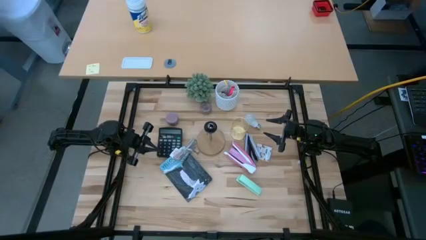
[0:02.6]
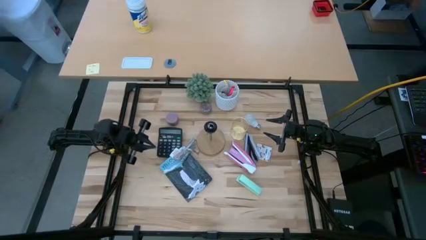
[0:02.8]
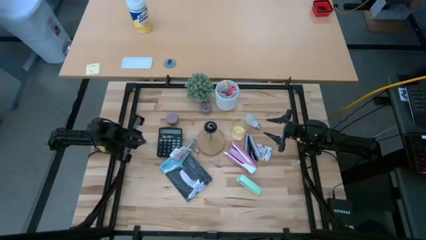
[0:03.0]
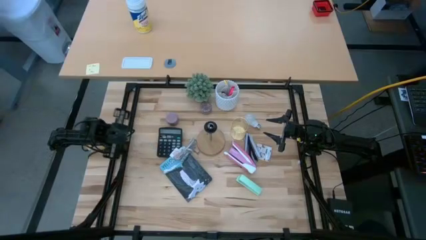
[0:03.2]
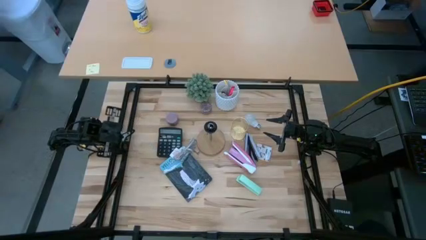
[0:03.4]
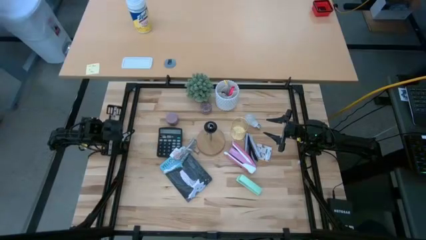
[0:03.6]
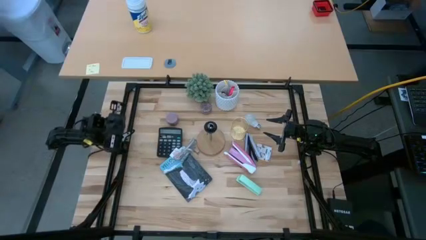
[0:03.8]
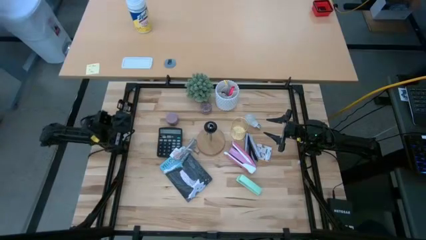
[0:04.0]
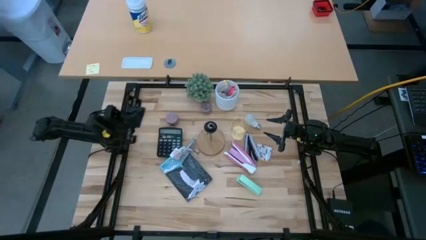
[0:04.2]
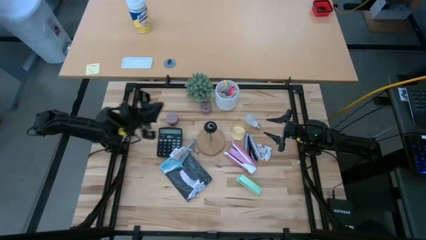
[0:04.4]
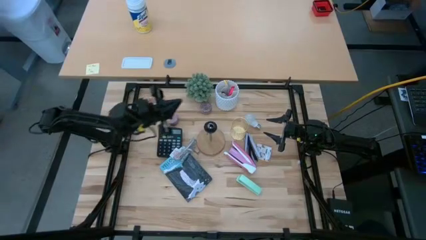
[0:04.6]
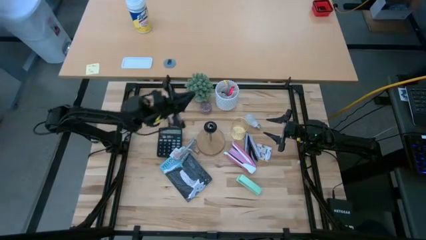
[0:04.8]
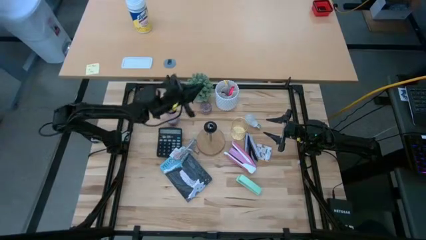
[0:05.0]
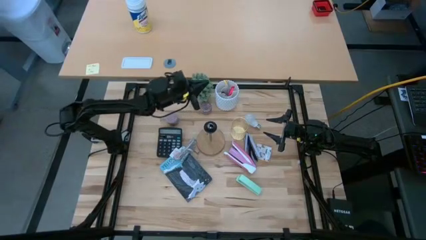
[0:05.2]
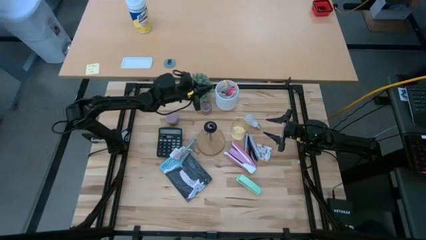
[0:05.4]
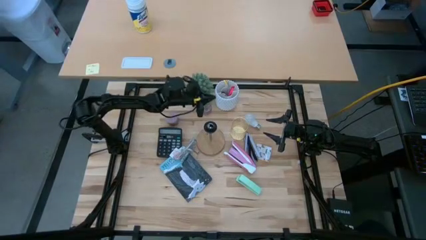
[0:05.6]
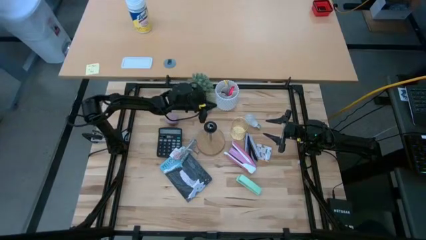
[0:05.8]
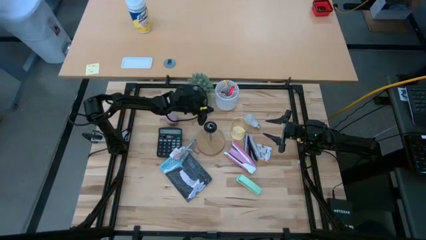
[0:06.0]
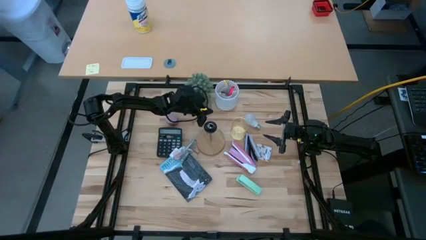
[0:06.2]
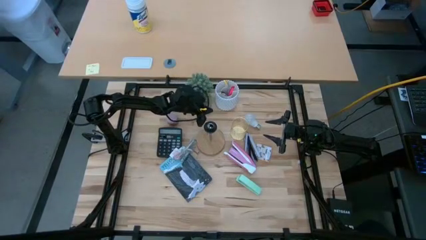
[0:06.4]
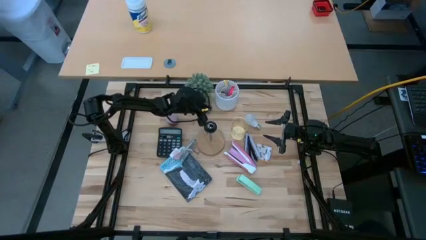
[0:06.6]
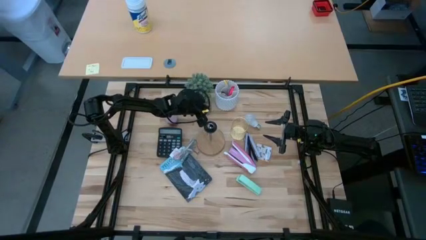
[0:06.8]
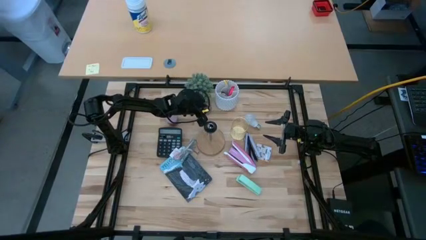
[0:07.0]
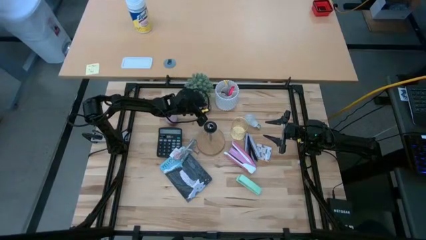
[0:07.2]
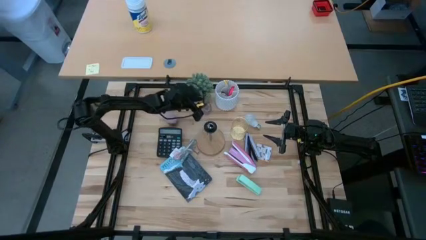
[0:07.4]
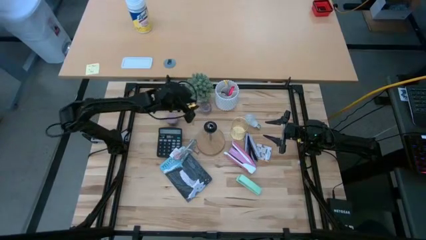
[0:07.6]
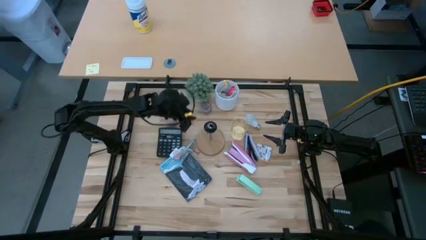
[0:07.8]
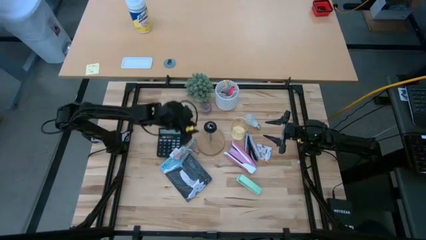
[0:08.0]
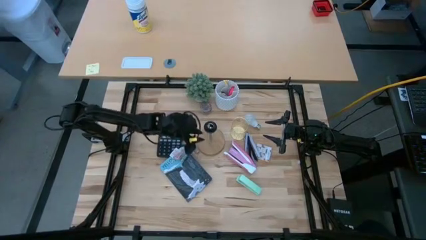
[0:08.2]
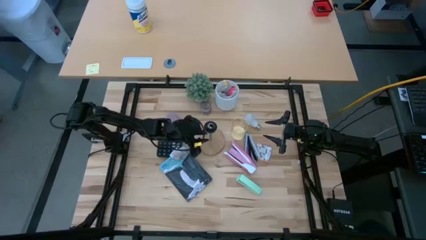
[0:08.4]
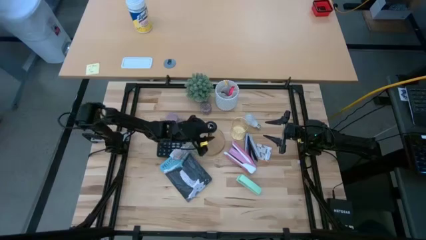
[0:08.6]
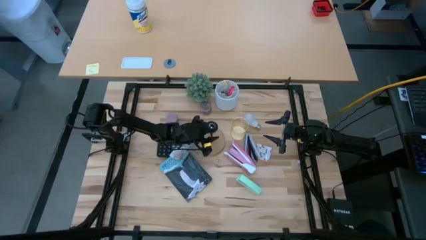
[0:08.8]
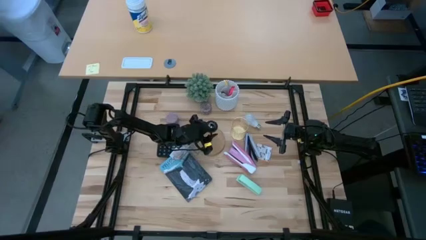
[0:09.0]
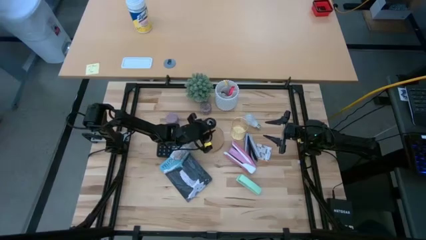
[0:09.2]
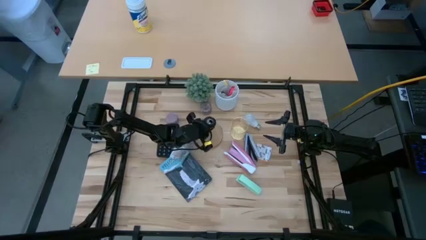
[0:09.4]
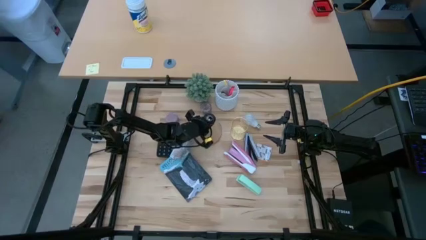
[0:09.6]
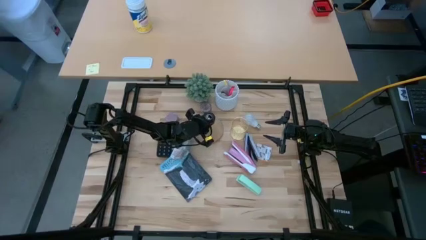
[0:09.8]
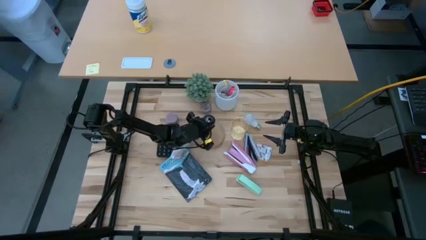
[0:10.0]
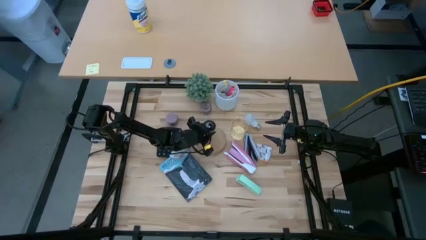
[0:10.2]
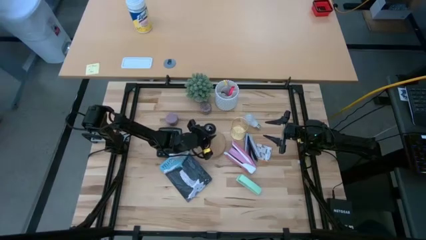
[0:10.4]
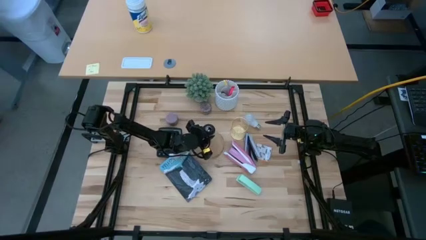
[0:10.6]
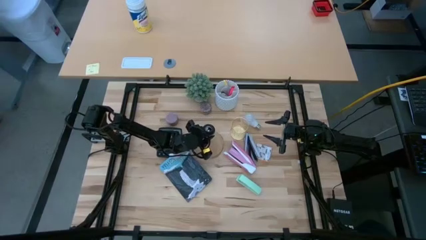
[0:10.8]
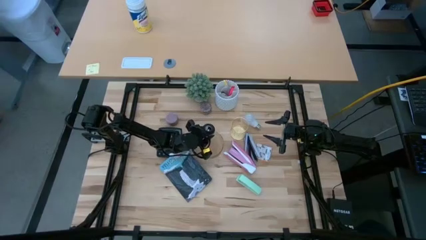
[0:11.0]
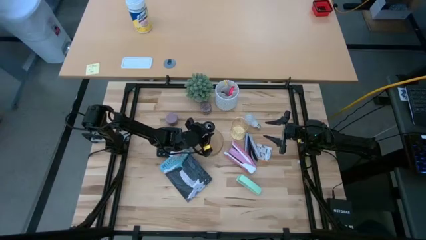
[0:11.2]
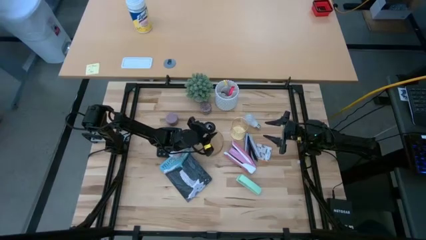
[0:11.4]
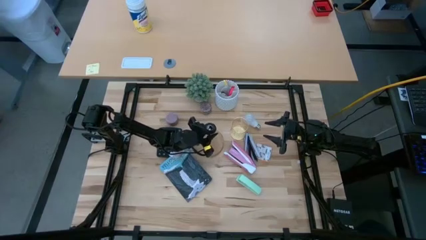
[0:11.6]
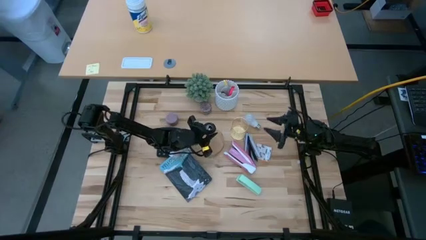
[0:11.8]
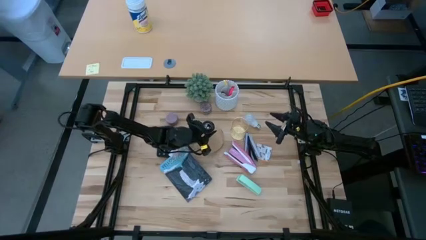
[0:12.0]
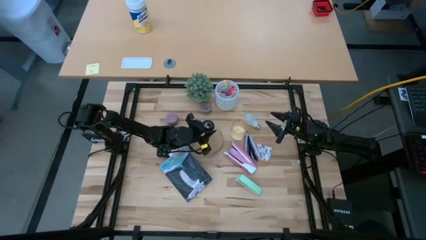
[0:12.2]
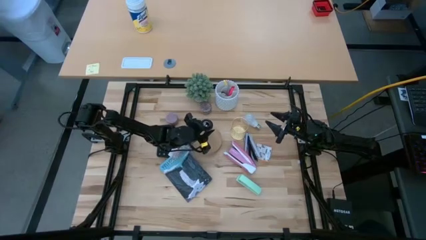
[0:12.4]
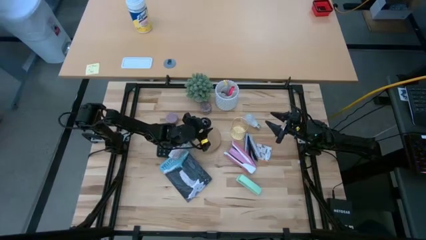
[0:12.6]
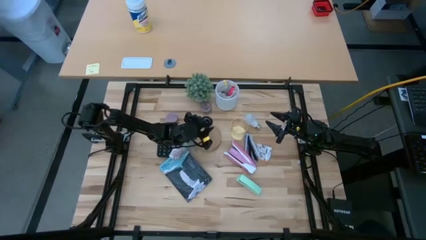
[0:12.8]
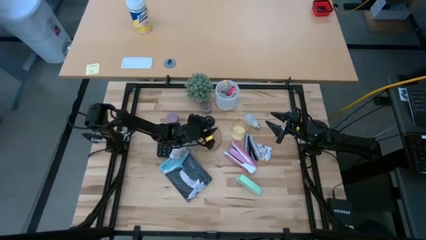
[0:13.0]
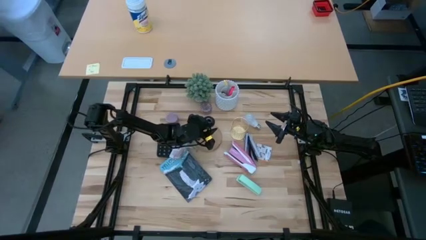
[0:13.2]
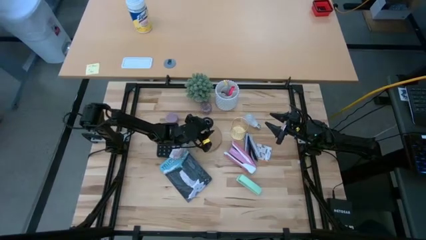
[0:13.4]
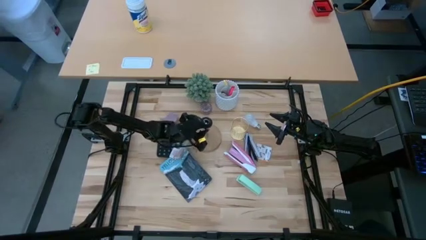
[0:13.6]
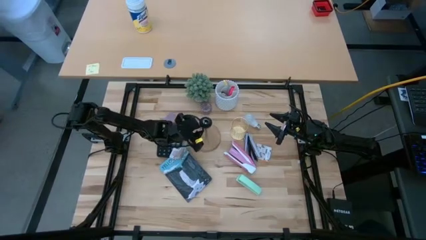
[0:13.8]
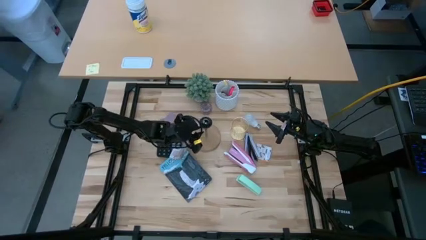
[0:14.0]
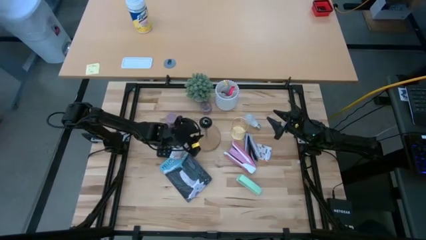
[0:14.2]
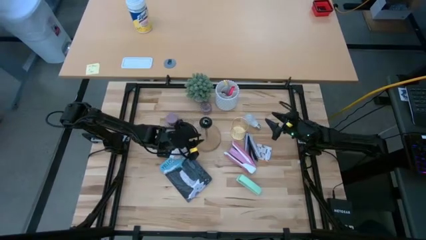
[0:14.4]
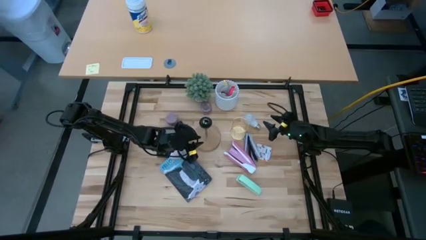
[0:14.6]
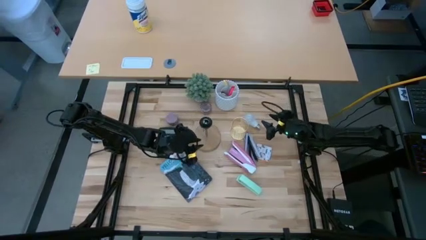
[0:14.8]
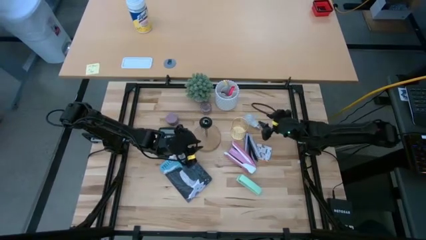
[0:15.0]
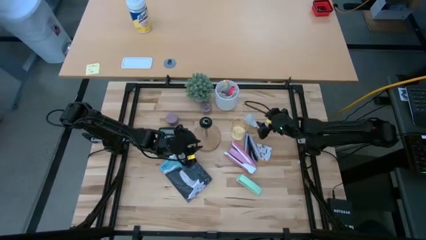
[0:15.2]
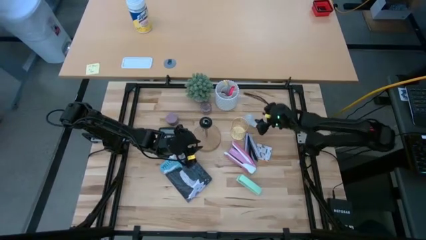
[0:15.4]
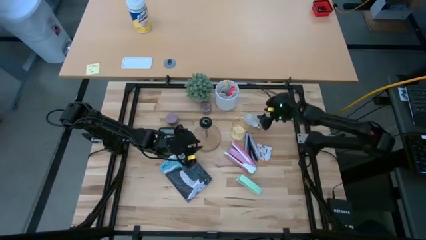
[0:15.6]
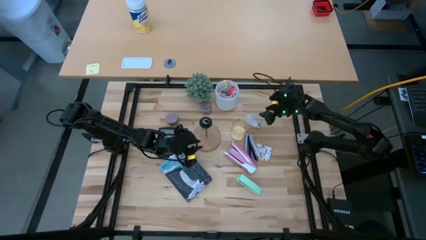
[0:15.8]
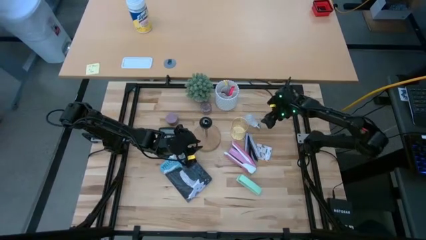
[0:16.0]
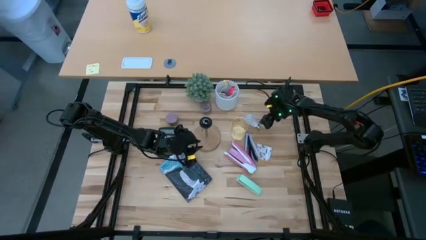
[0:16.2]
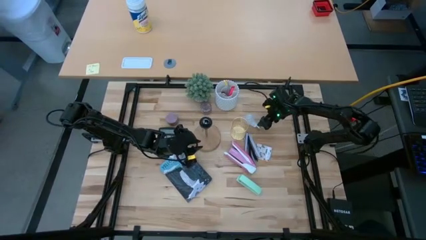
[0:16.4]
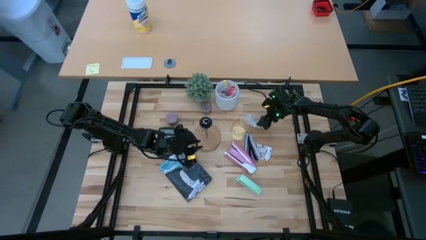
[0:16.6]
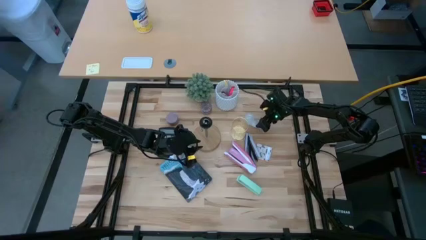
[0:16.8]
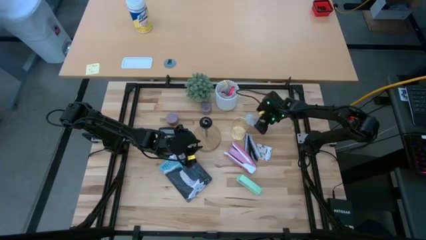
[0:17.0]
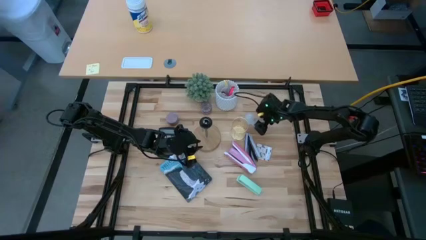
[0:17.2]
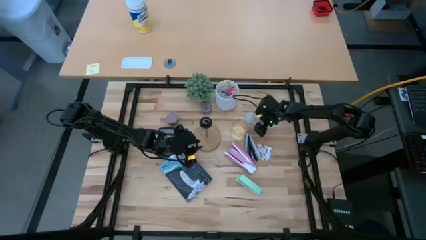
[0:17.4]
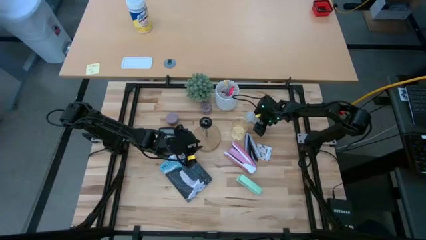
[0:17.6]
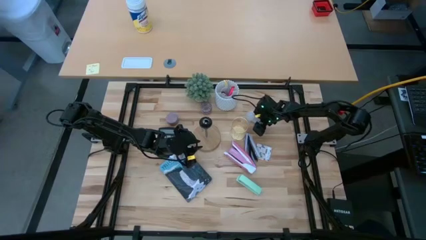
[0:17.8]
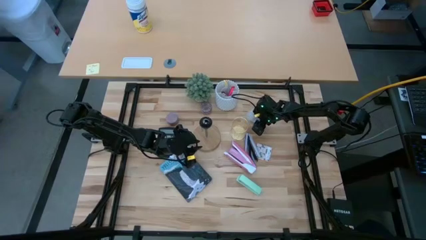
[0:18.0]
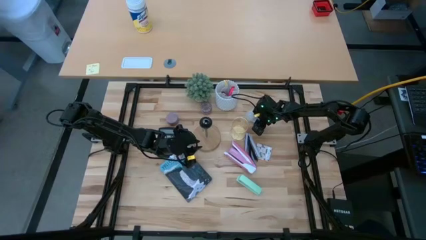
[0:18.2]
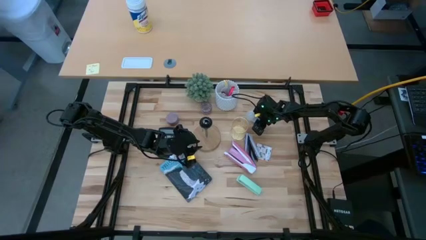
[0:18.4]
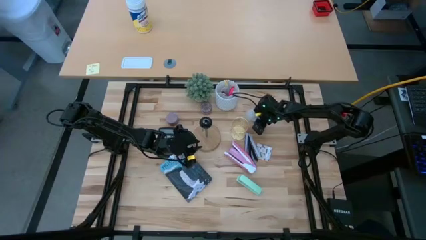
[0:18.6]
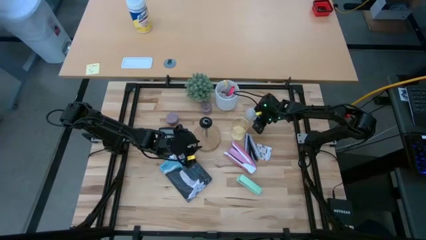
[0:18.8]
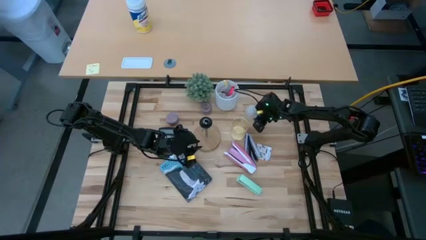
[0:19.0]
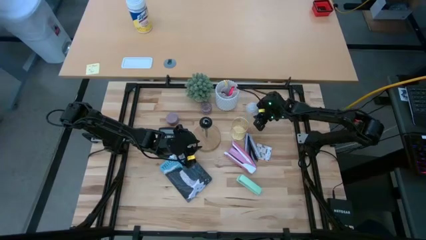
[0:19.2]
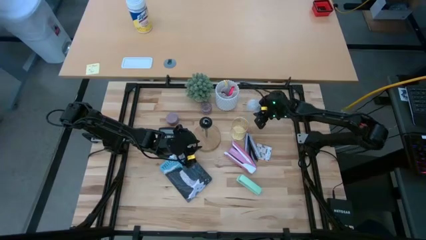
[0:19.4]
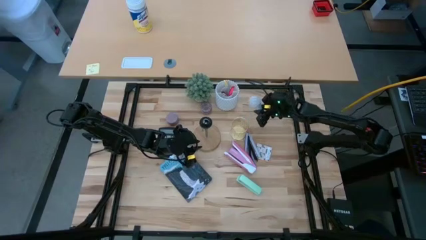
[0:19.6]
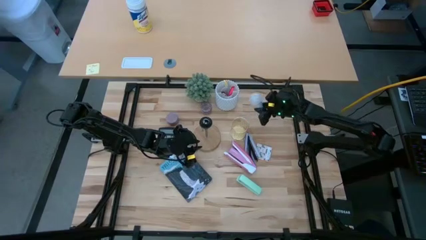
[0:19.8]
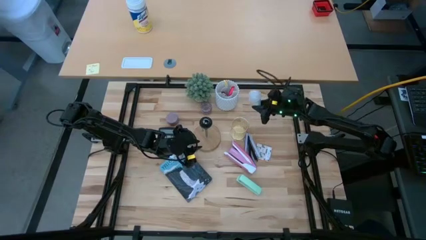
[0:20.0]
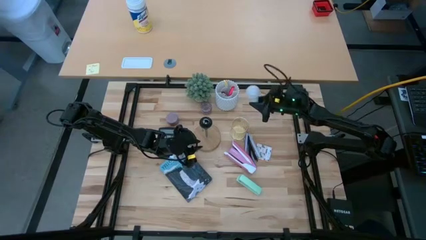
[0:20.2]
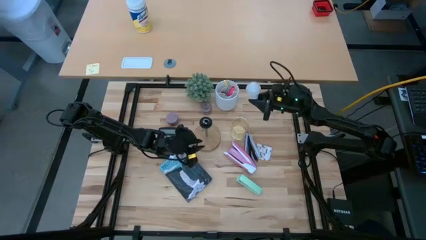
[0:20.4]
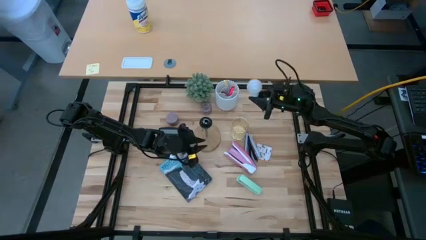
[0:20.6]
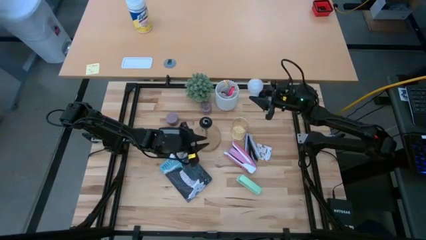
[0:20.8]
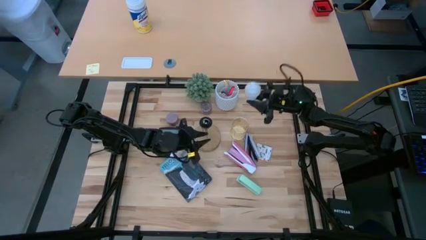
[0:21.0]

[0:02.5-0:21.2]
Task: Screw lightbulb
Insert the lightbulb into the lamp
